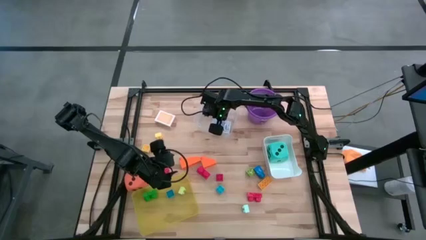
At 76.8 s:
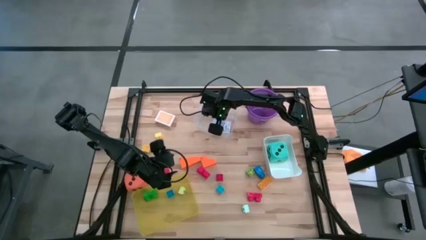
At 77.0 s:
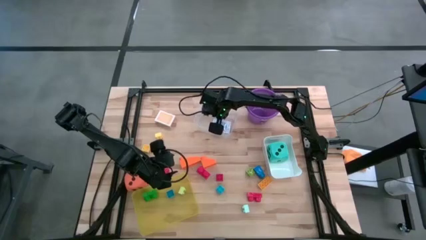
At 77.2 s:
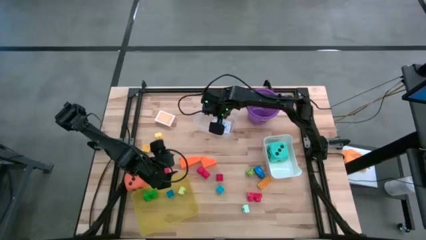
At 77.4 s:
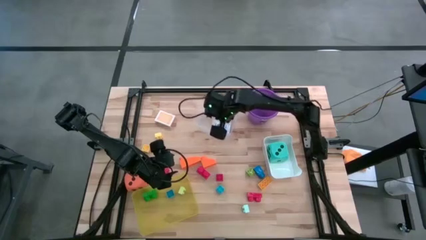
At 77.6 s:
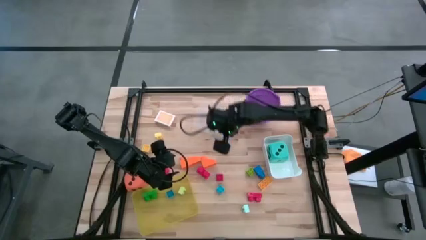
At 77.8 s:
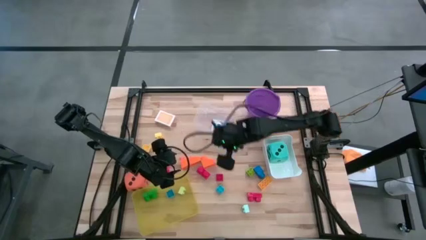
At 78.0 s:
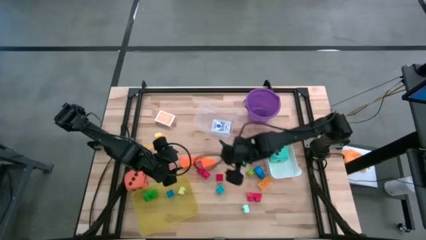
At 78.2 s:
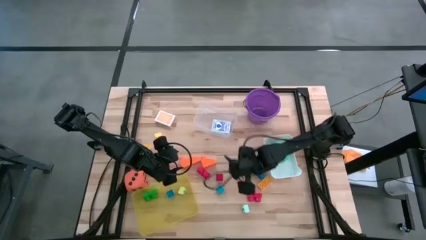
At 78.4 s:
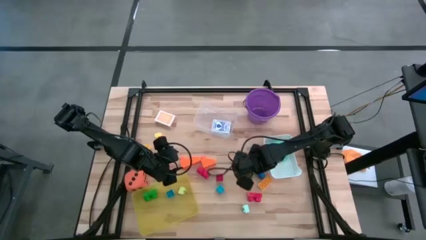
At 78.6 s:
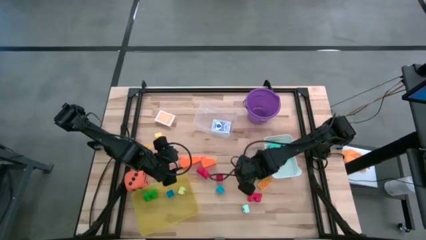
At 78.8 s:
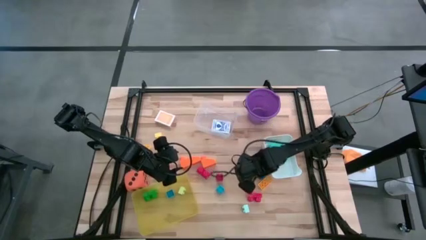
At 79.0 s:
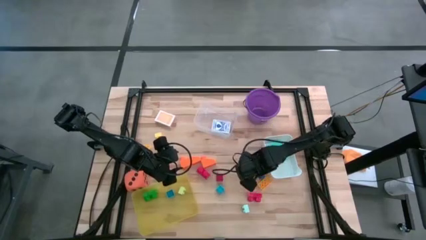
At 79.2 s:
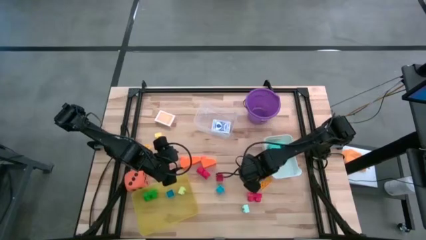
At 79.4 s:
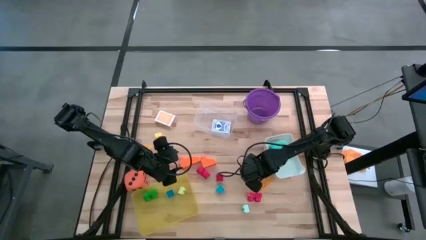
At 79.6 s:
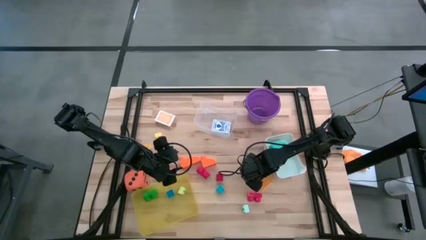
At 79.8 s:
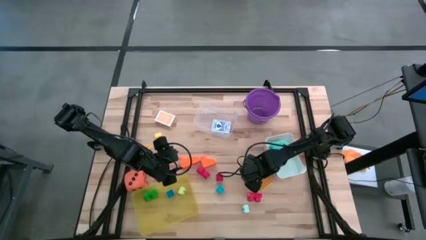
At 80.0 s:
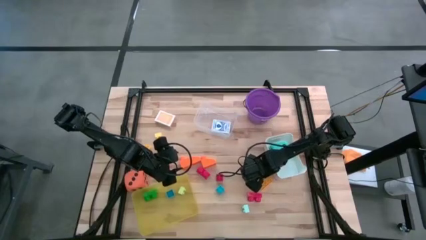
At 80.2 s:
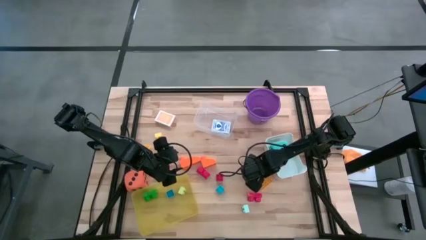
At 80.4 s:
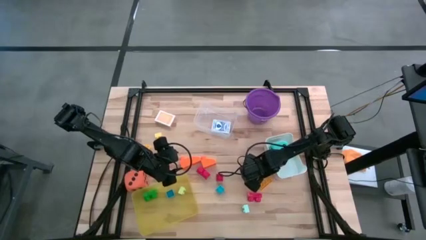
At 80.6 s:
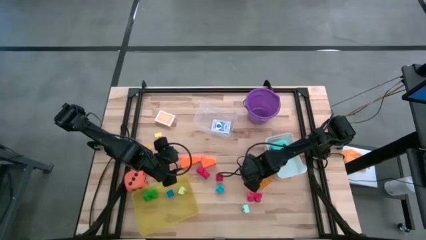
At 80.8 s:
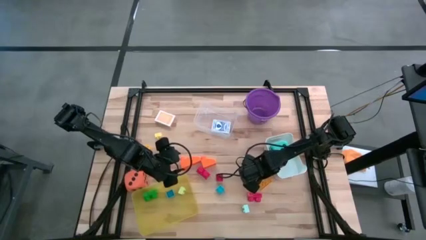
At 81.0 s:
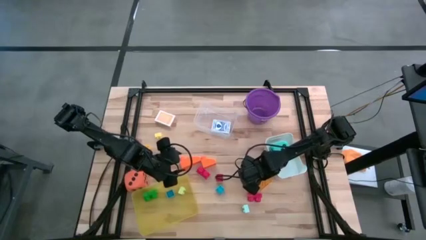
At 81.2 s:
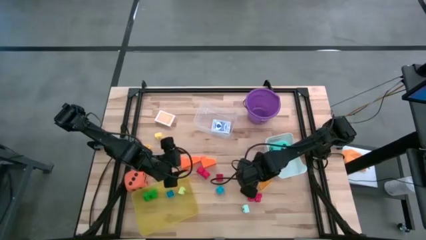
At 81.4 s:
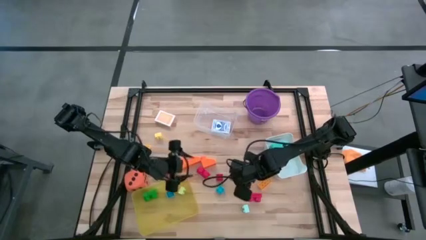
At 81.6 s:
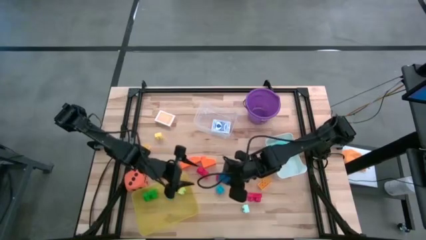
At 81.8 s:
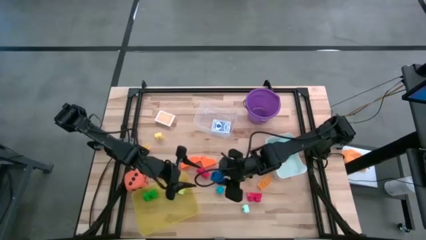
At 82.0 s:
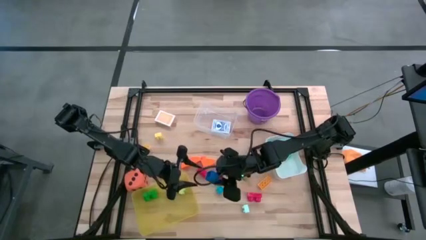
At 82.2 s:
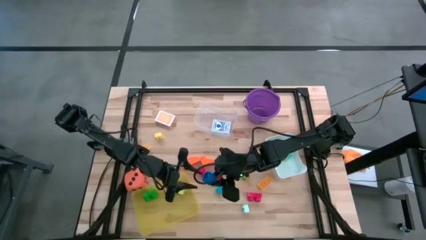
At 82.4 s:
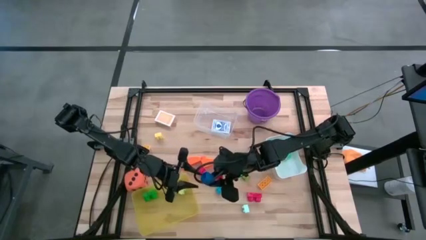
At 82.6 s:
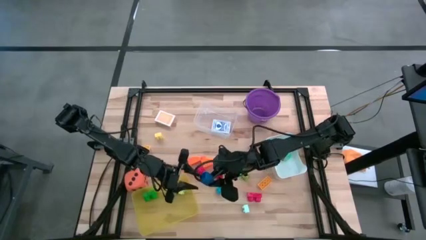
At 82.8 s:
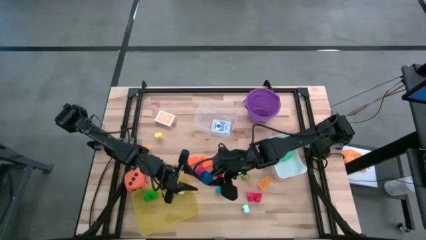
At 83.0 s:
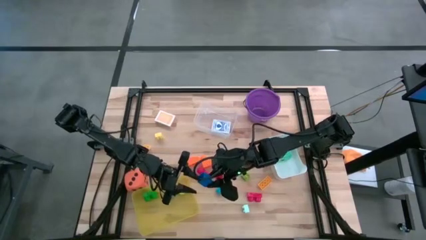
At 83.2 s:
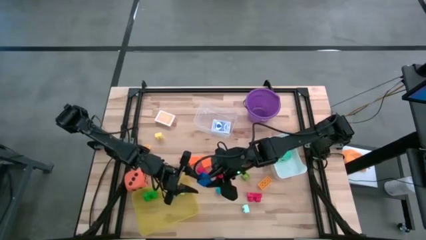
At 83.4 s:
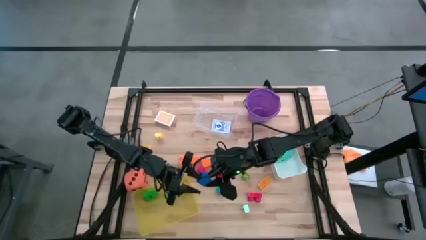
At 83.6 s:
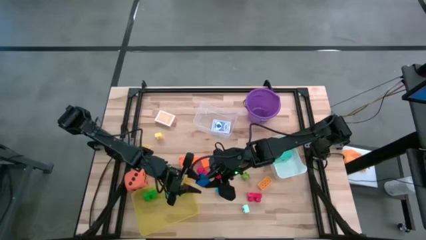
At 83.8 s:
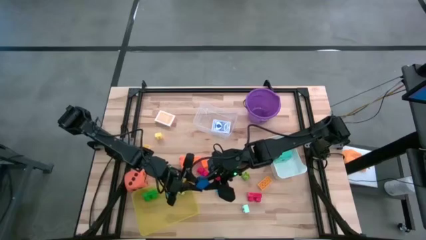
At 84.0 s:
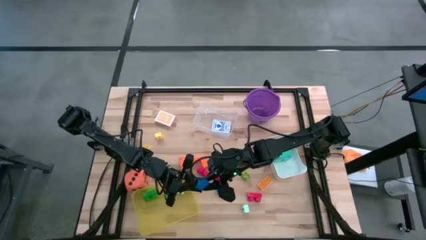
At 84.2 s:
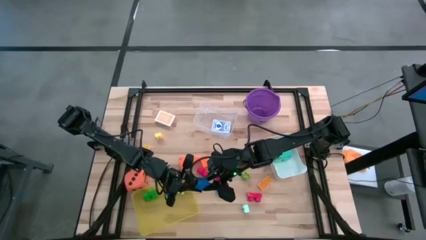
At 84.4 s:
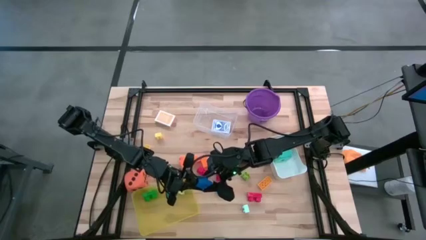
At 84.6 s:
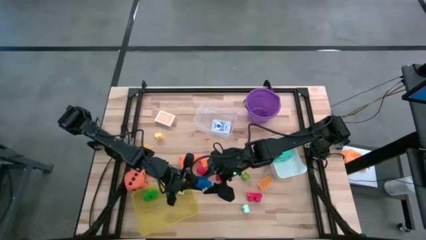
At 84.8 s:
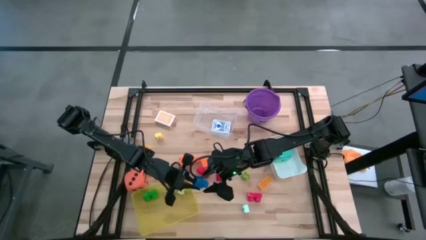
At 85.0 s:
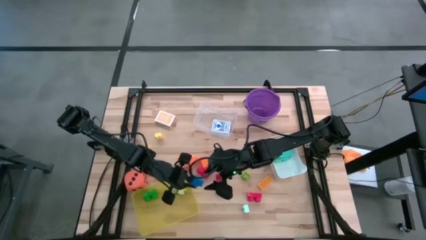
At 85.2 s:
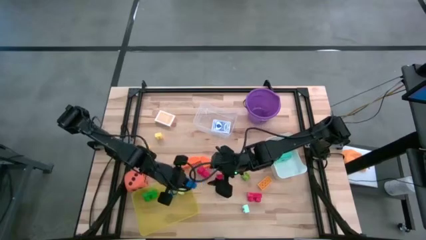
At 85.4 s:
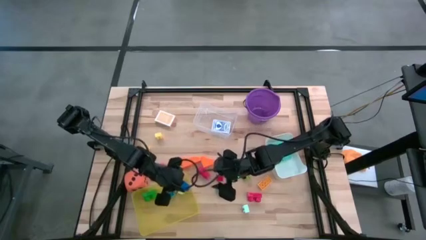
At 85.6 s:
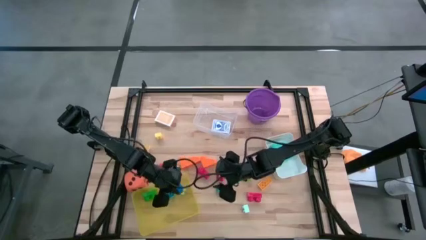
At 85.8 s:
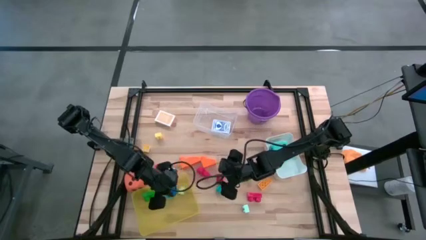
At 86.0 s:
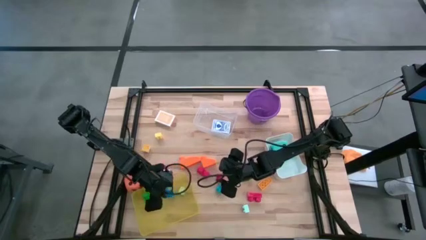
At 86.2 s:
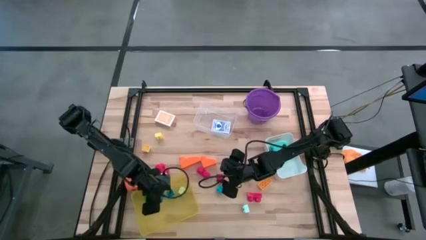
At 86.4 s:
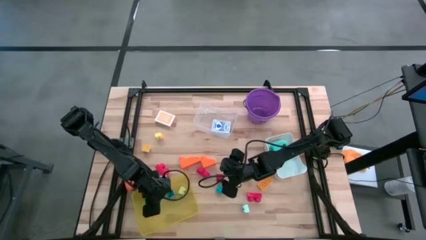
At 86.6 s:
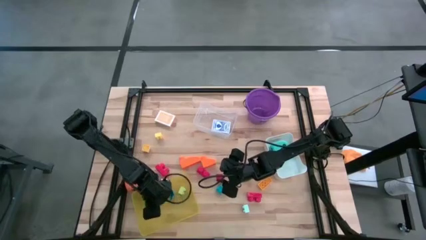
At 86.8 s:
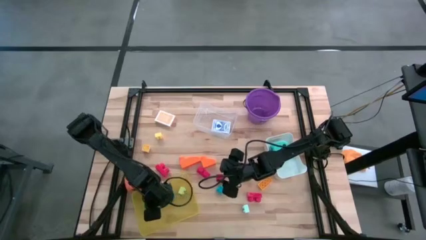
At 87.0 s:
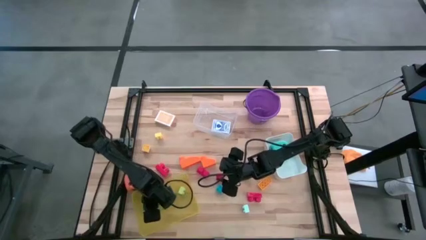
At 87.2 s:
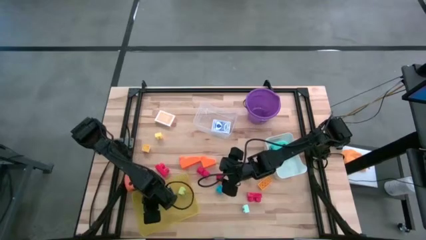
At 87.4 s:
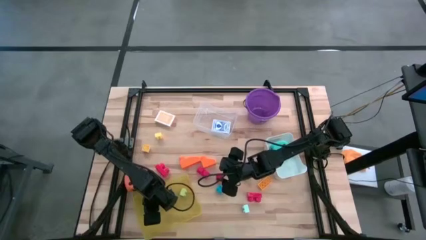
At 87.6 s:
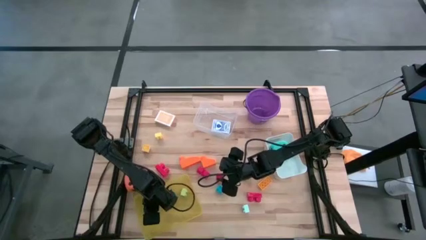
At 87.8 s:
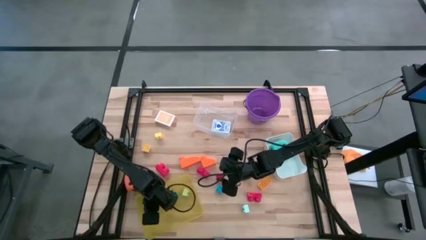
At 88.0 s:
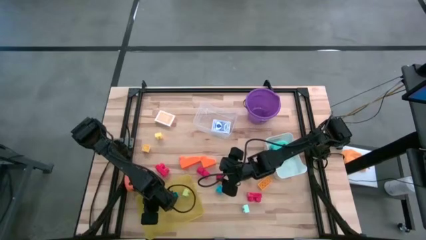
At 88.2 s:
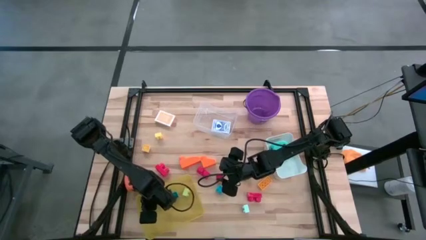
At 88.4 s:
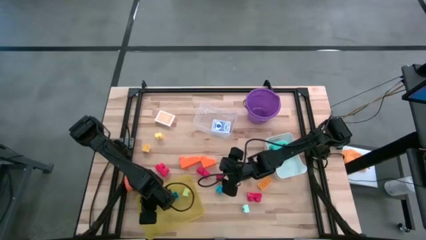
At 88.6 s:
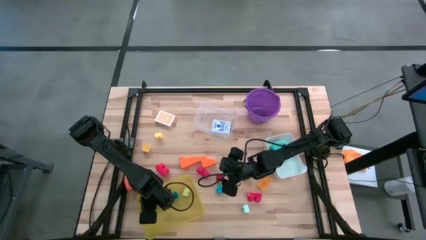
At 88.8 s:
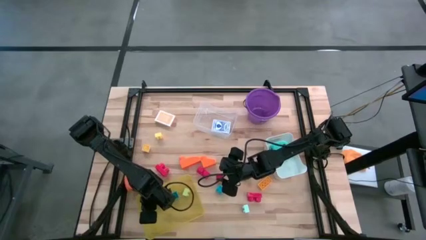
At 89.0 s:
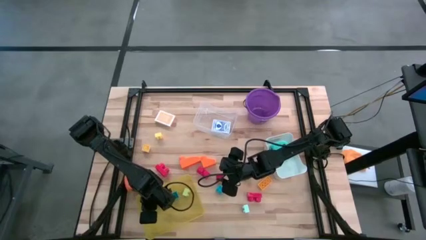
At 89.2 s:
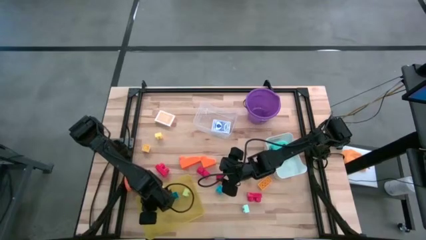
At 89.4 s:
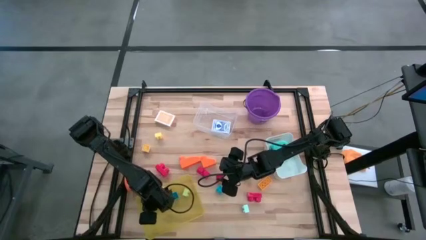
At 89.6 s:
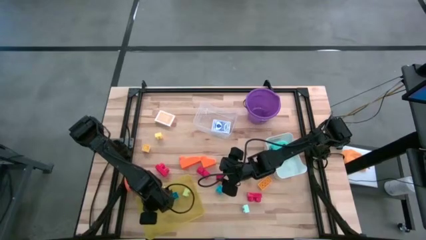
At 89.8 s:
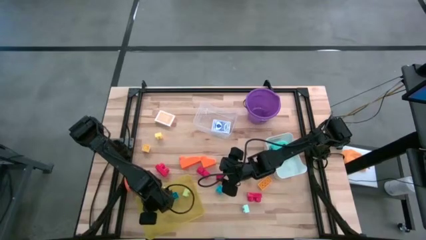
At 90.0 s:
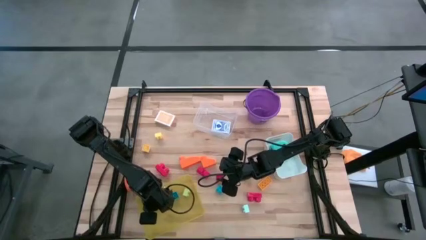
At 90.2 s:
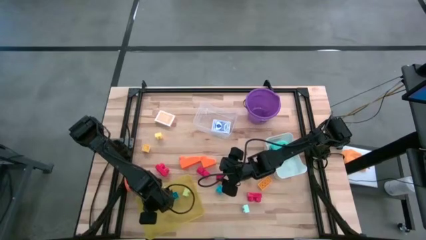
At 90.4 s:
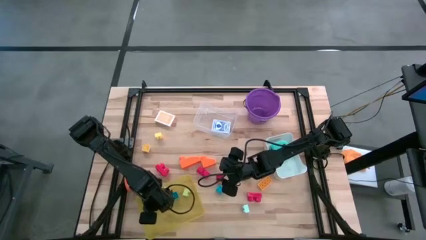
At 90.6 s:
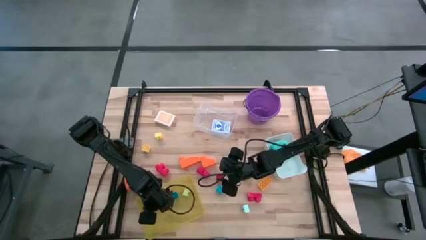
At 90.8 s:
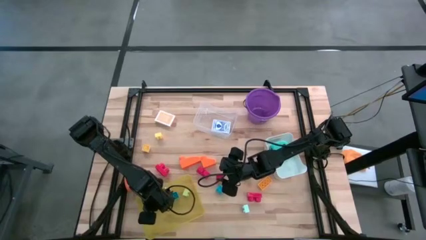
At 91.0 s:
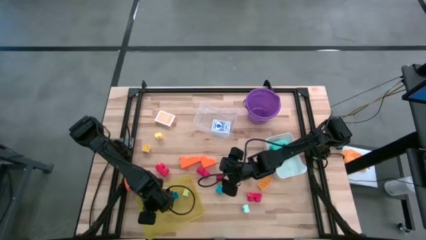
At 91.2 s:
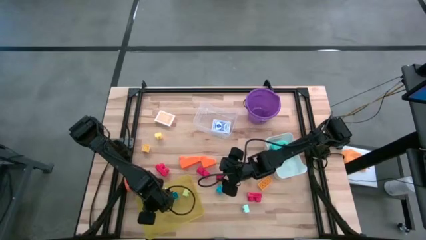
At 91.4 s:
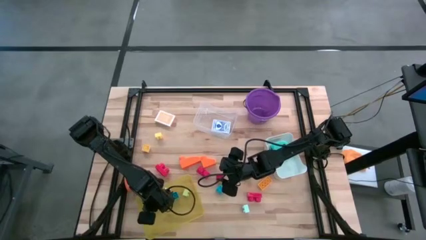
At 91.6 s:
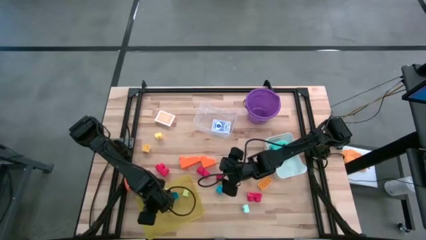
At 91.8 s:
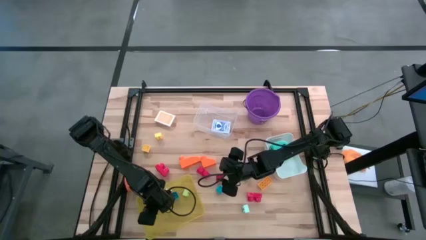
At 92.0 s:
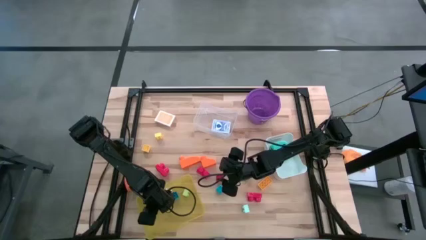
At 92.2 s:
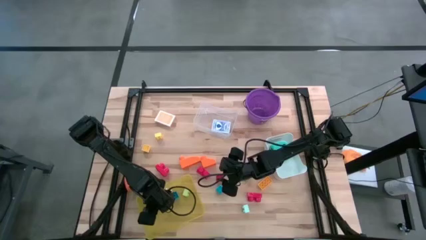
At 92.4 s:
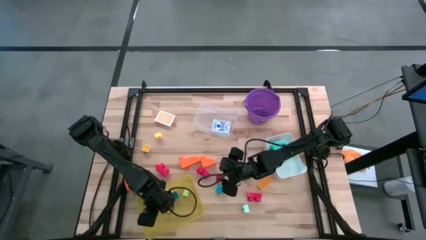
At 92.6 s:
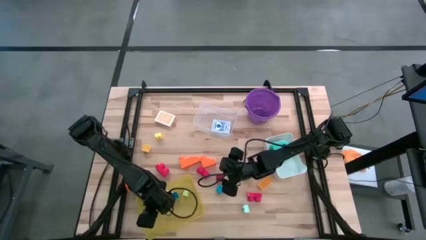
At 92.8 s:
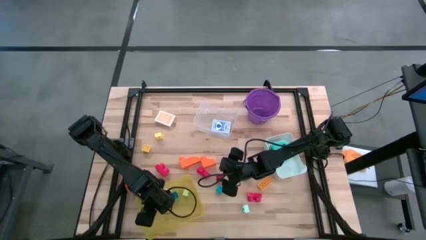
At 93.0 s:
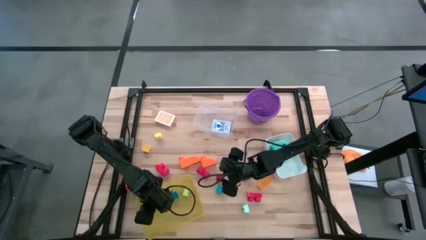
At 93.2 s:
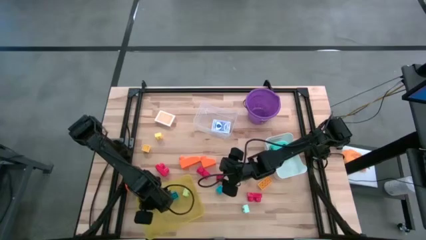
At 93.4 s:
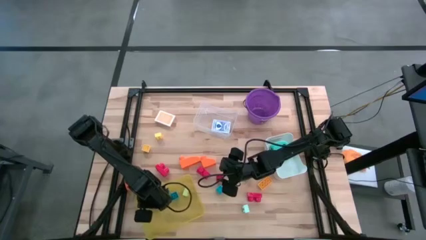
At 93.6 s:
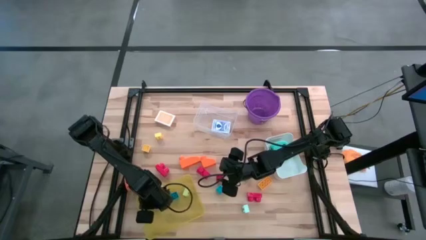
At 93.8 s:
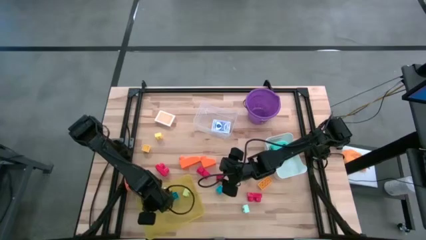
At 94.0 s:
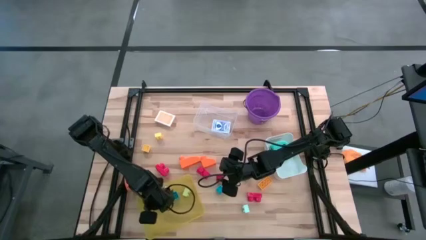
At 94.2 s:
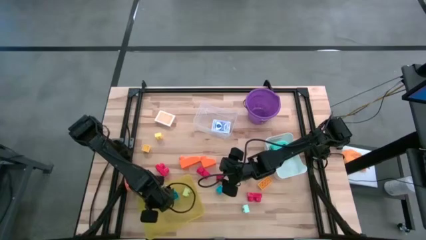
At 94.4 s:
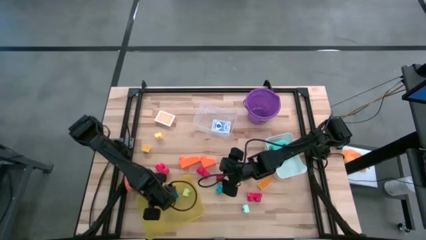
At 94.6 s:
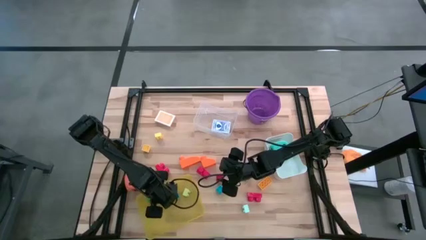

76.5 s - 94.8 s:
Task: Pick & Place Toys
Put the blue game piece into the yellow bin
